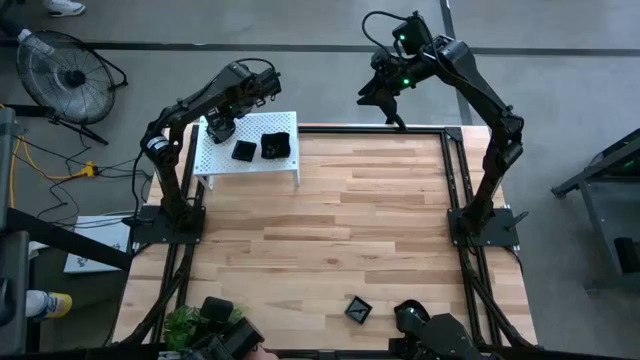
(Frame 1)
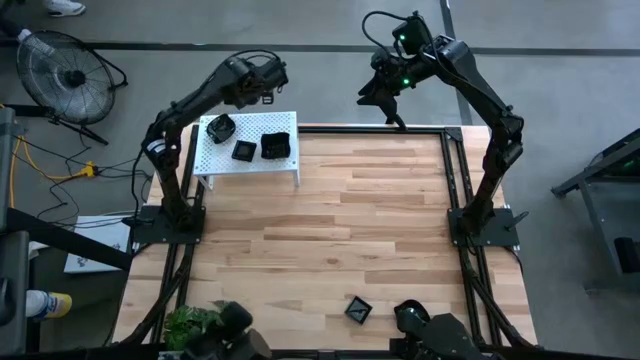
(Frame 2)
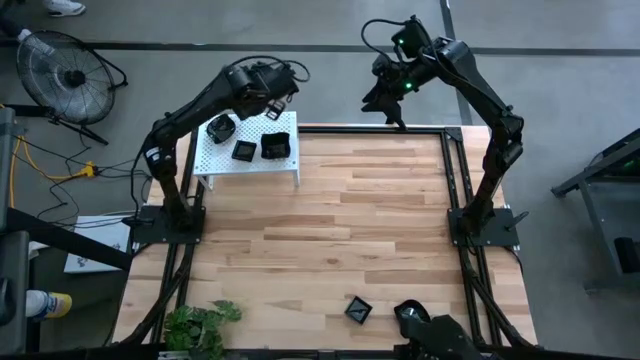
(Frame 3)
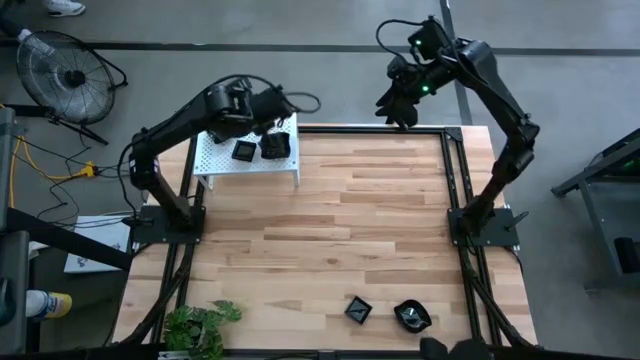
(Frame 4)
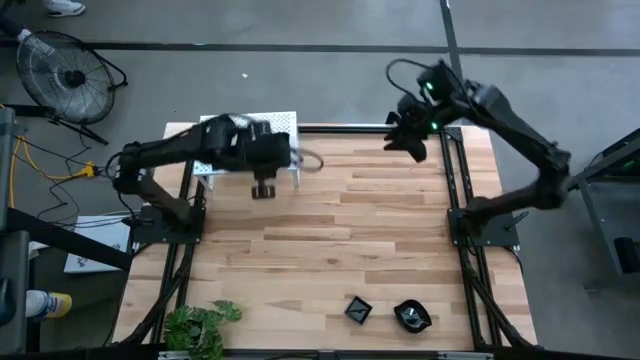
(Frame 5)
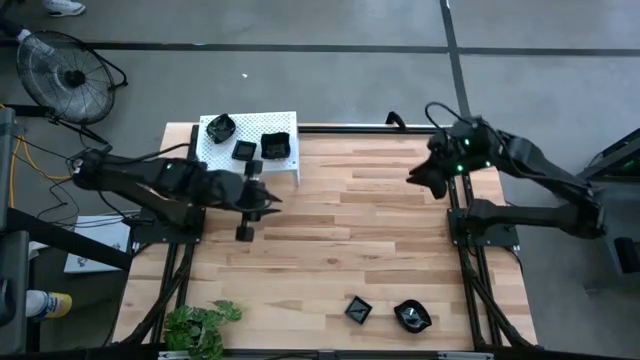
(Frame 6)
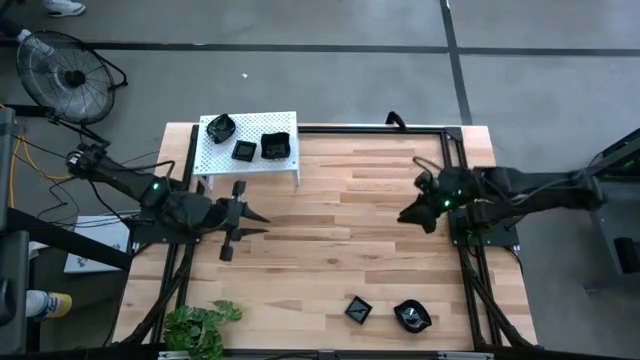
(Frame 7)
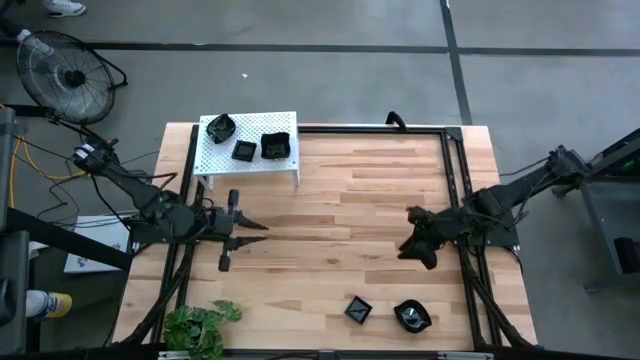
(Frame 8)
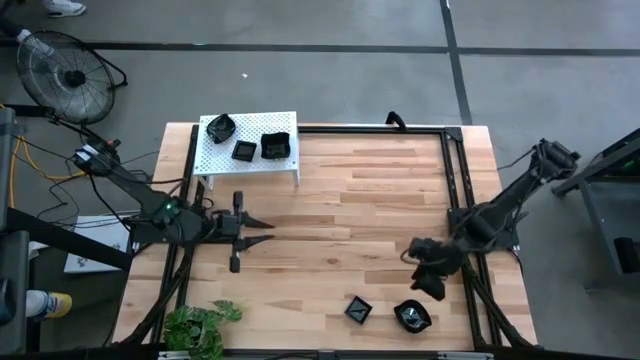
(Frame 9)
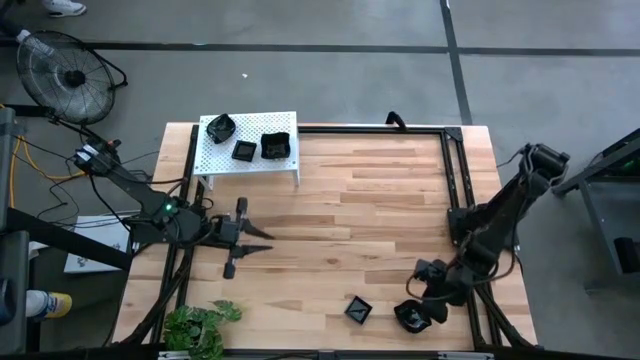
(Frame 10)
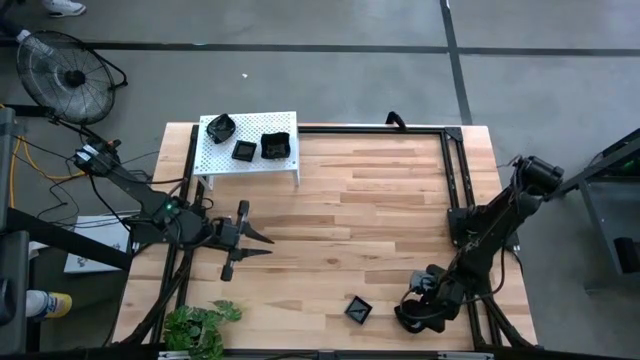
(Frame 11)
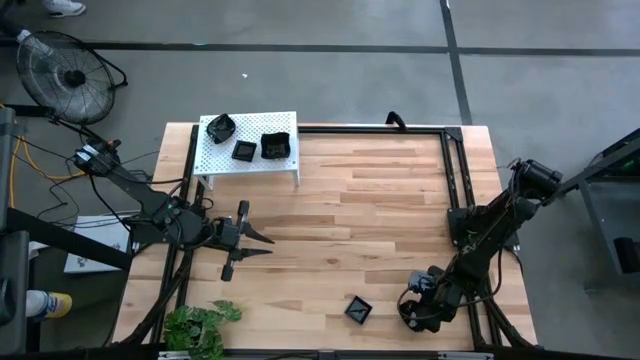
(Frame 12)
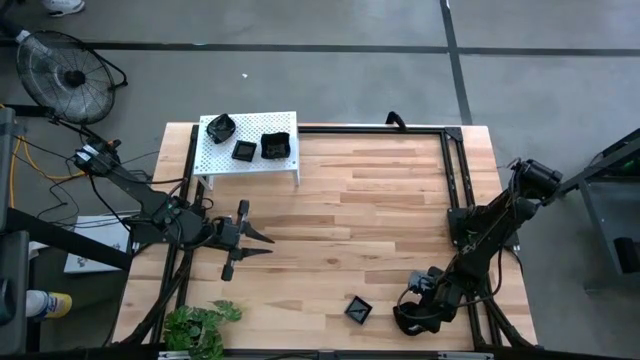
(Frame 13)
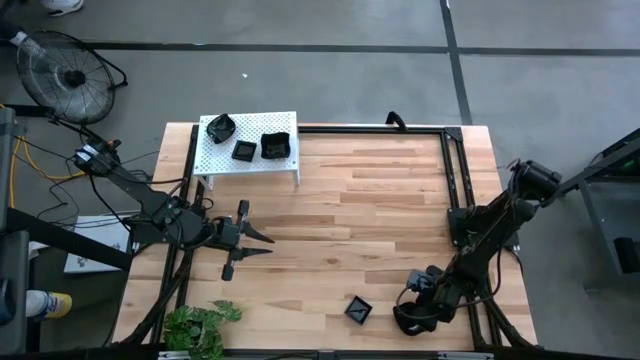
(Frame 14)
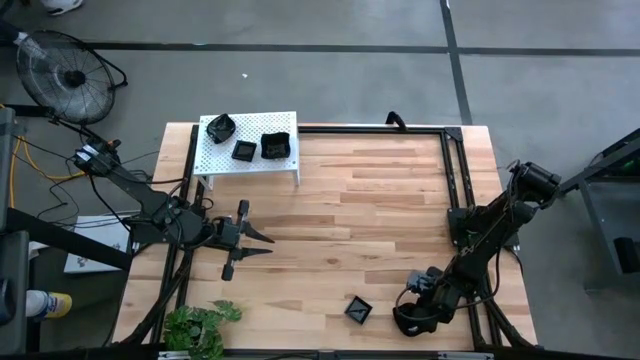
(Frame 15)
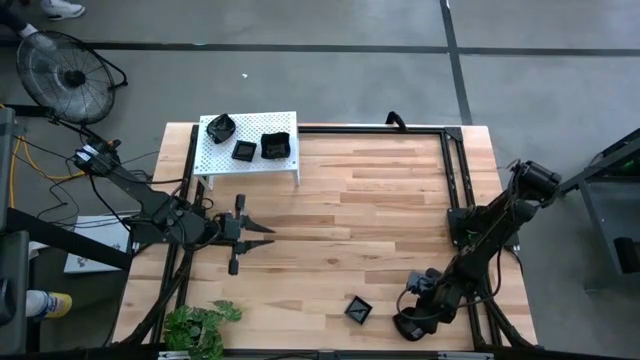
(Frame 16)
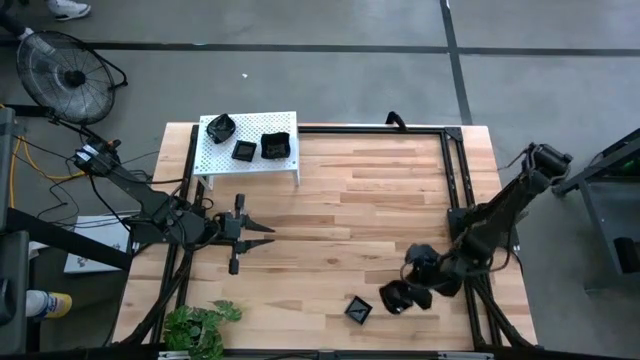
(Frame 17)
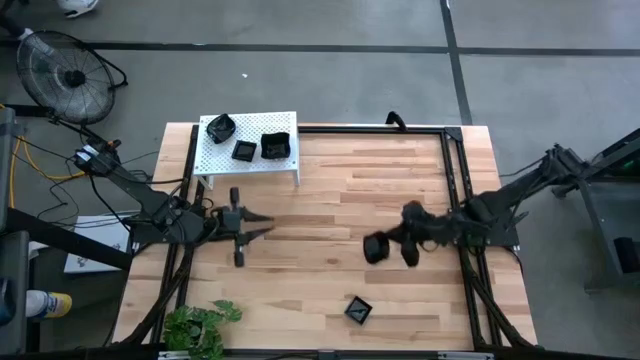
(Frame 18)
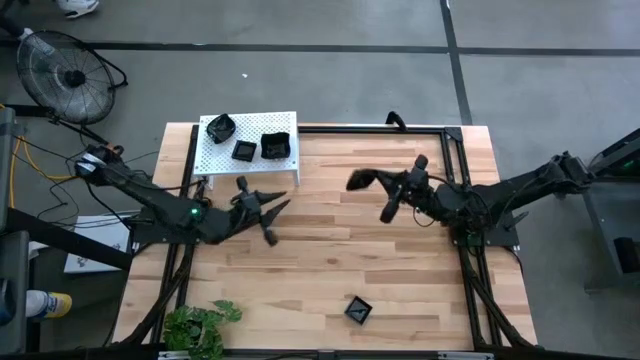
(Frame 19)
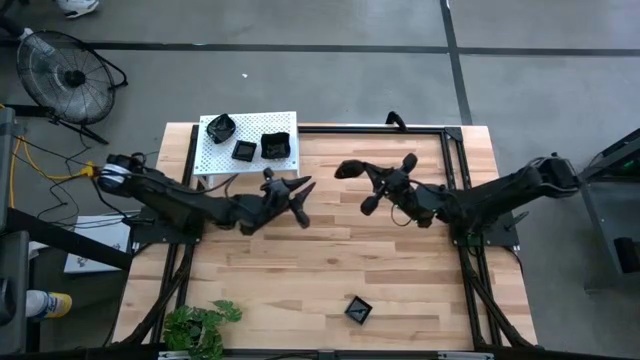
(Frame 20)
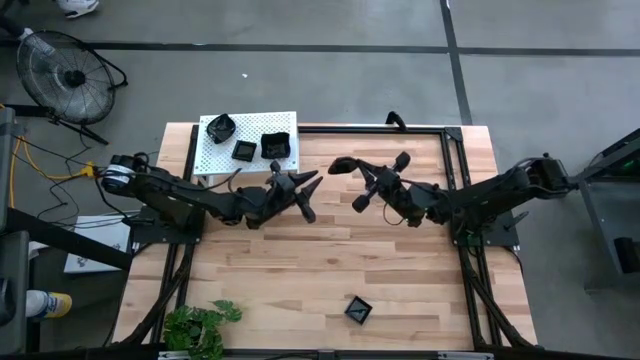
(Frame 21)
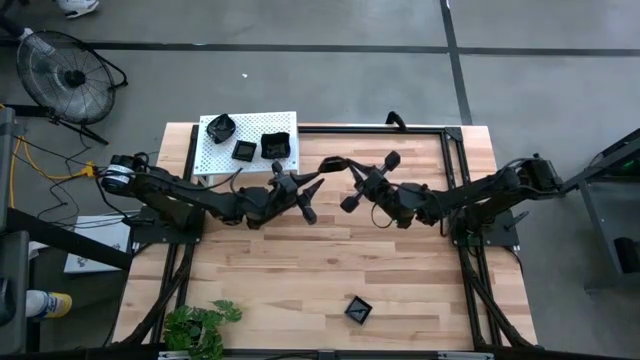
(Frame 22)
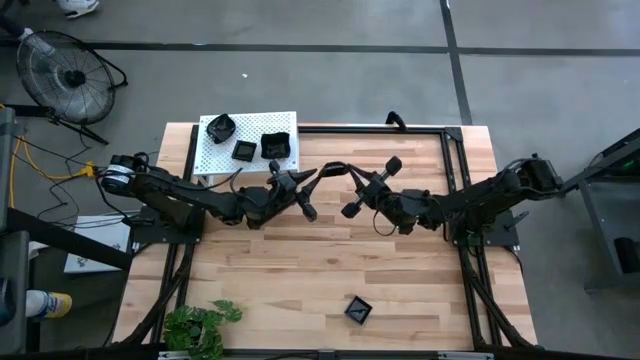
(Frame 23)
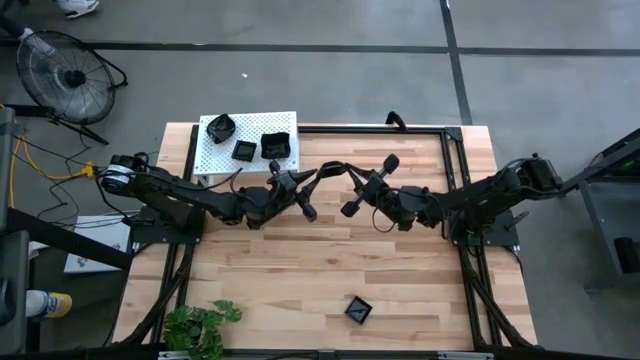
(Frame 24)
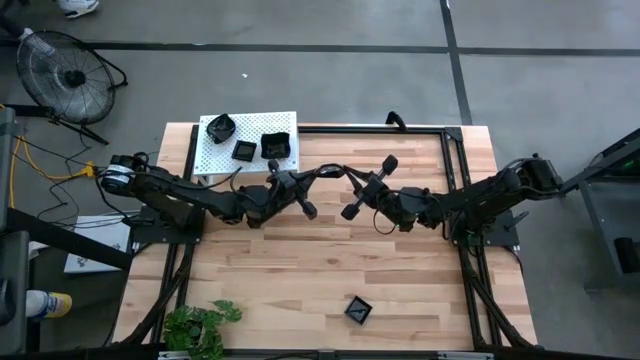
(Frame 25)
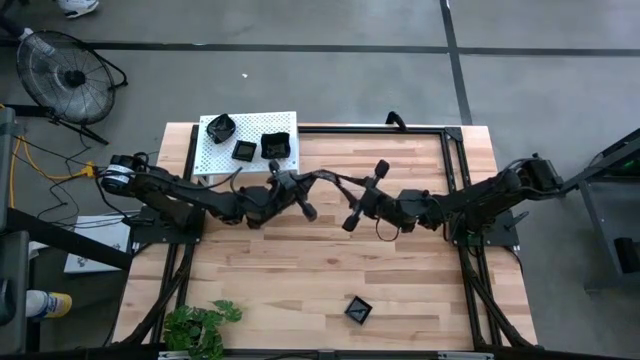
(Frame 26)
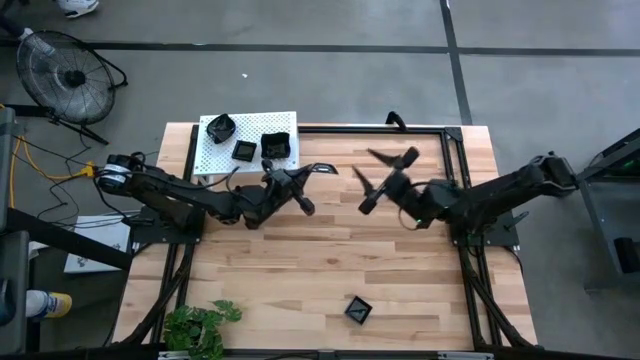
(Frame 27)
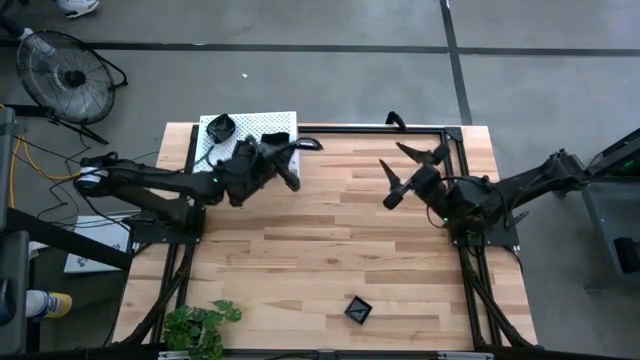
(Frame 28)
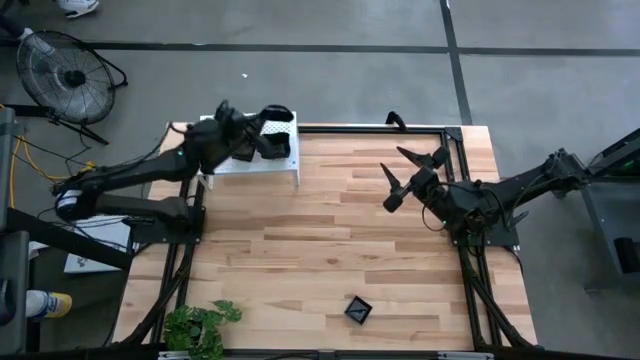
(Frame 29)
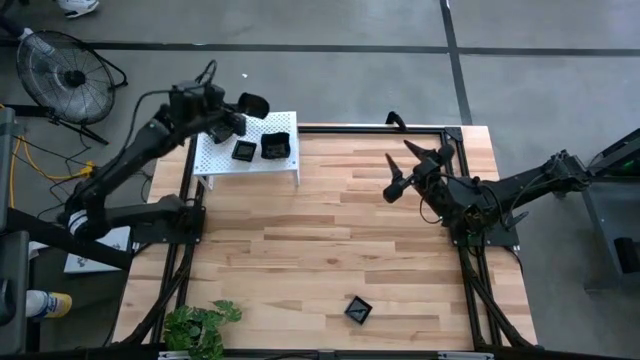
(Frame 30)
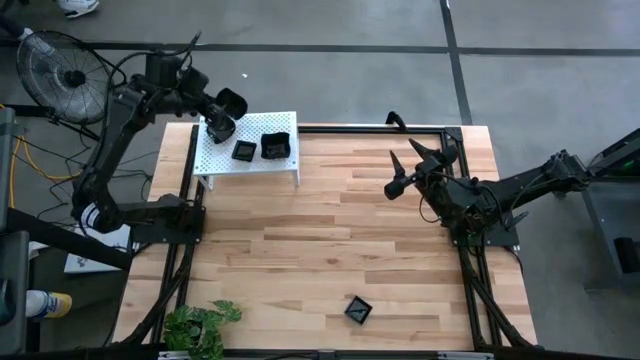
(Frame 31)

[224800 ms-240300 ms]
Task: Pick & Place Mini shaped plates
Stack the black leaf shaped plate on top of the black leaf shaped plate on the shelf

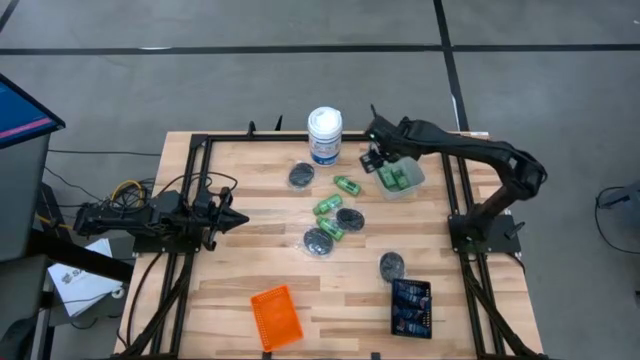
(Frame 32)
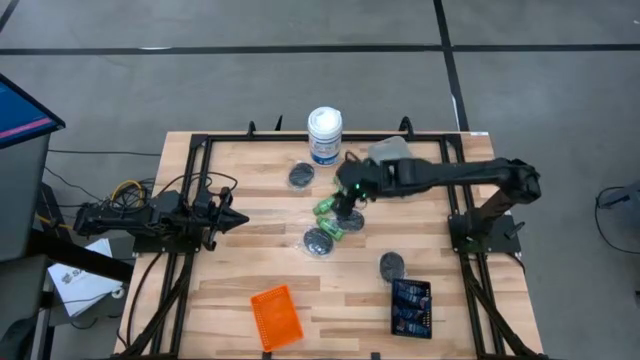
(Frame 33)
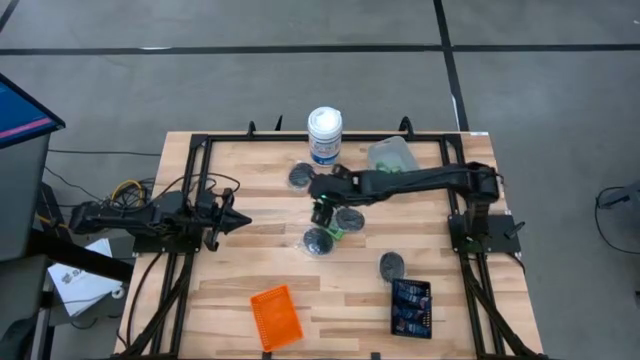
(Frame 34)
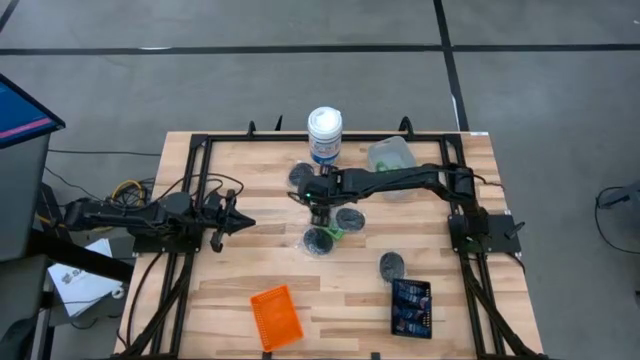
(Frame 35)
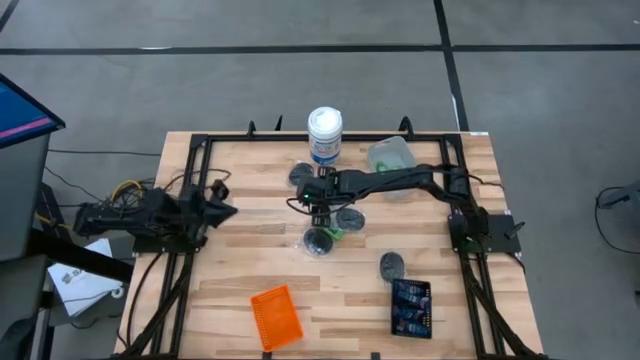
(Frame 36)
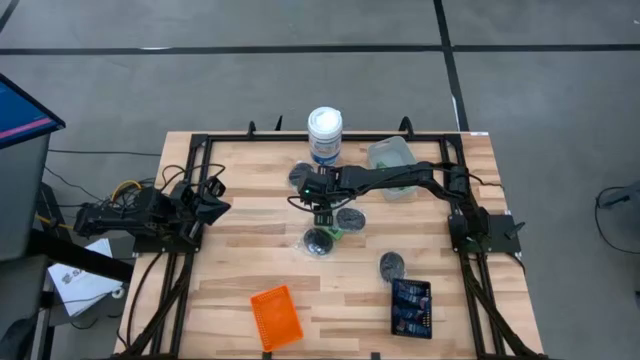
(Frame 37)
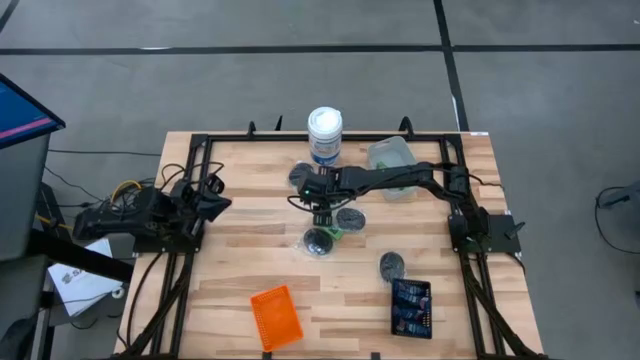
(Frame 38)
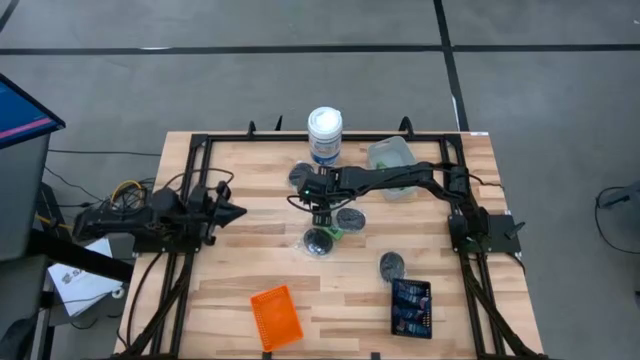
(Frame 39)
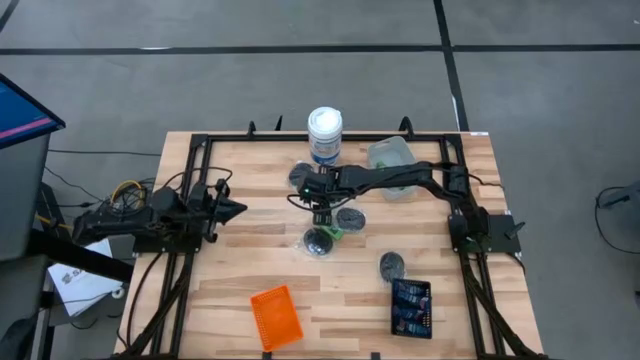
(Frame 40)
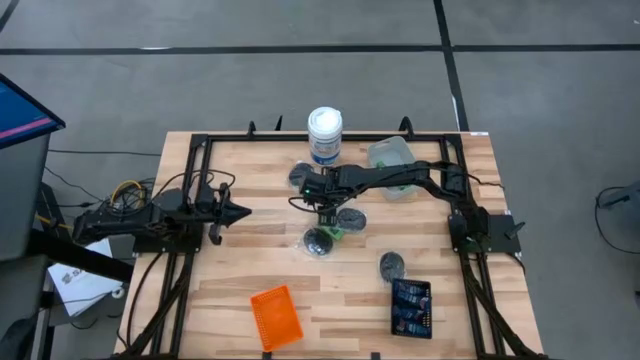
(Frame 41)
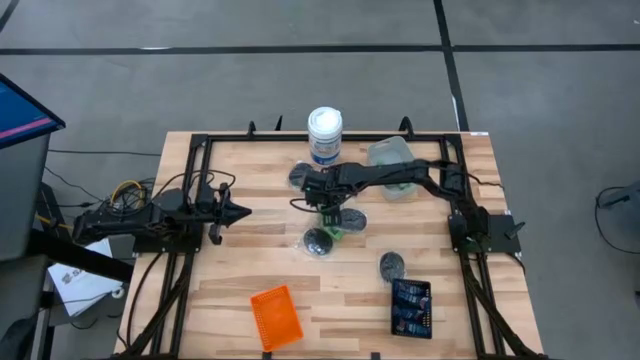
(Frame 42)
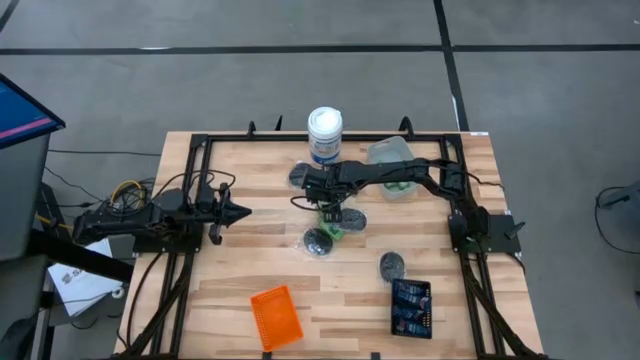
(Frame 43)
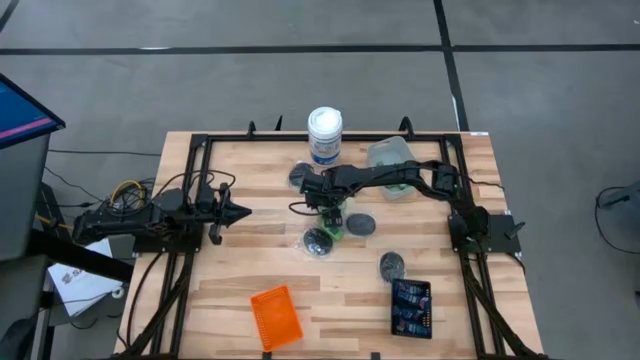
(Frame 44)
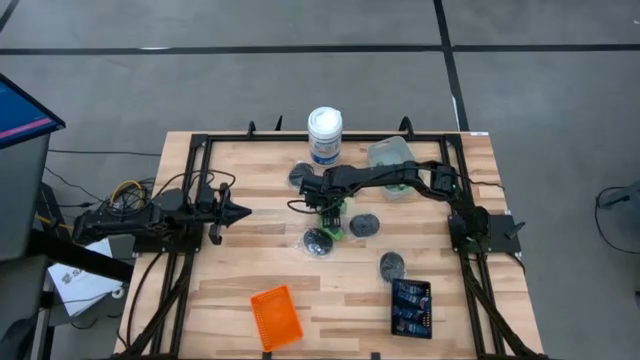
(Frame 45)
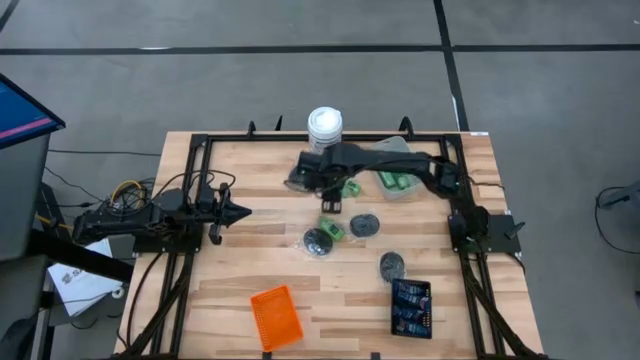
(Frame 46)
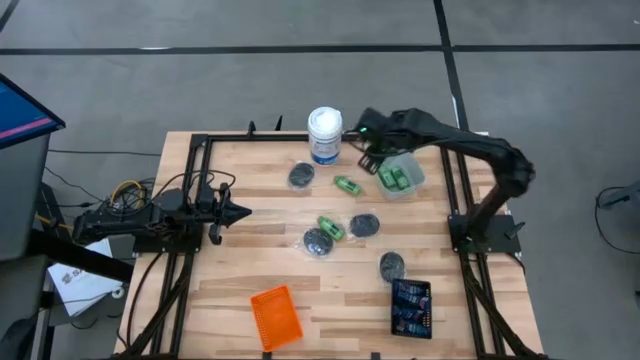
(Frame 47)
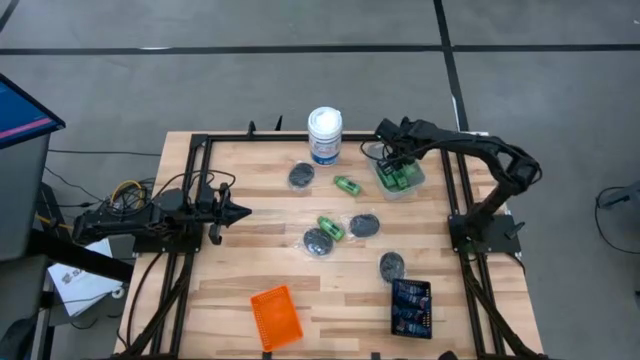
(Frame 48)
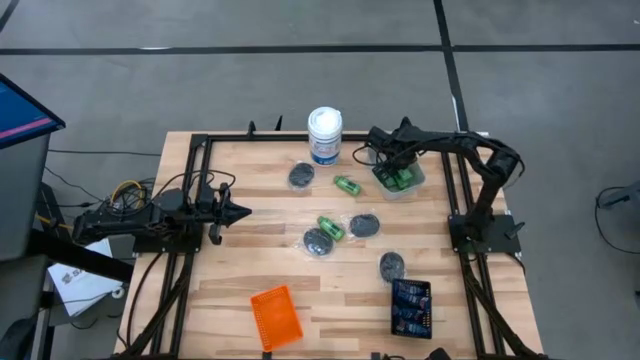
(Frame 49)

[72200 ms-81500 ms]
Task: Pick & Place Travel size toiletries
Put the green shampoo into the gray basket
